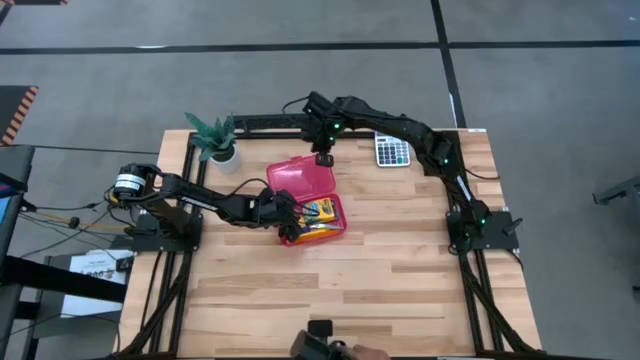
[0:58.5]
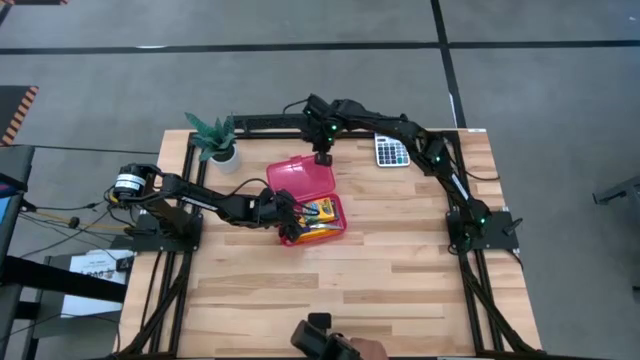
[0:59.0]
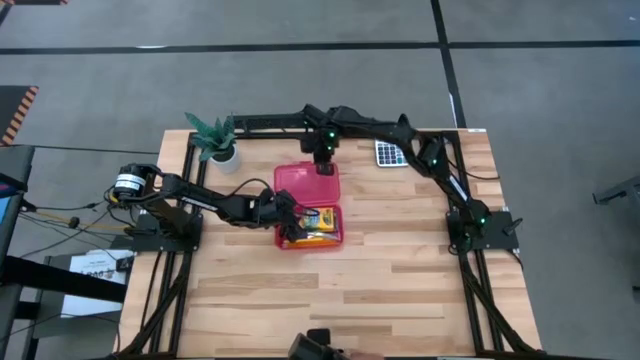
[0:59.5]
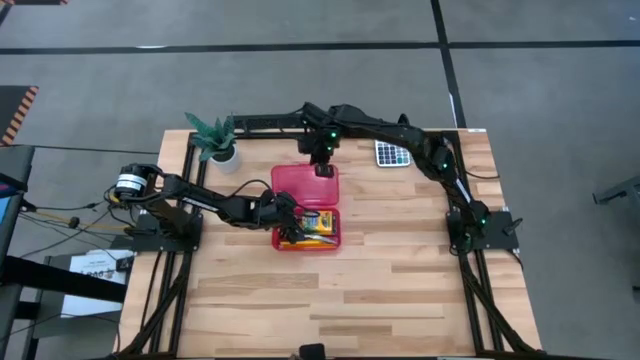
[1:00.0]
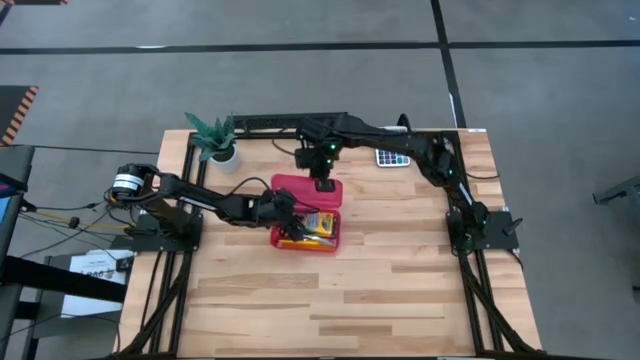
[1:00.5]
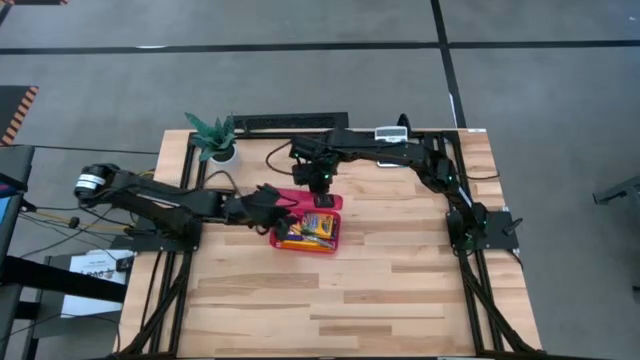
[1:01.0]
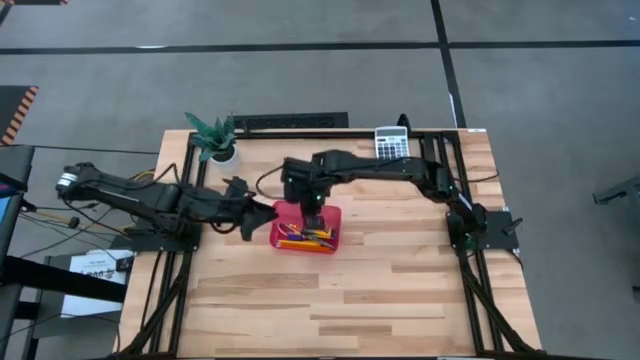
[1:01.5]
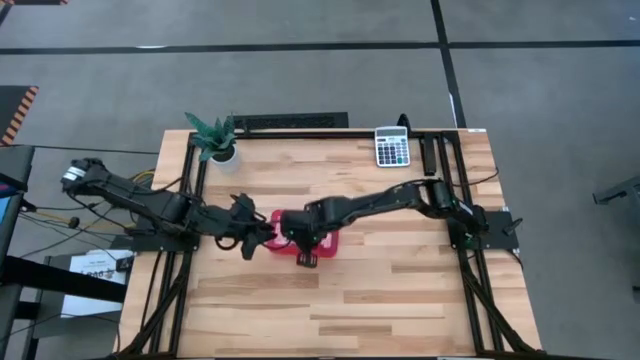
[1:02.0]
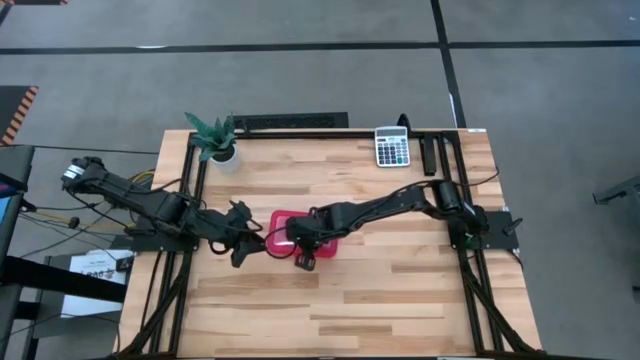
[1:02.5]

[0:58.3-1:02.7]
Task: Pack school essentials
Close the lid of the supply box

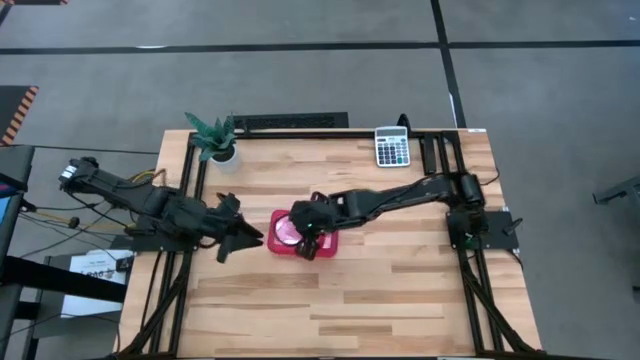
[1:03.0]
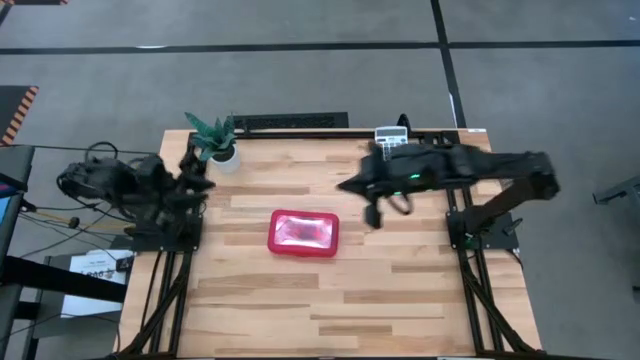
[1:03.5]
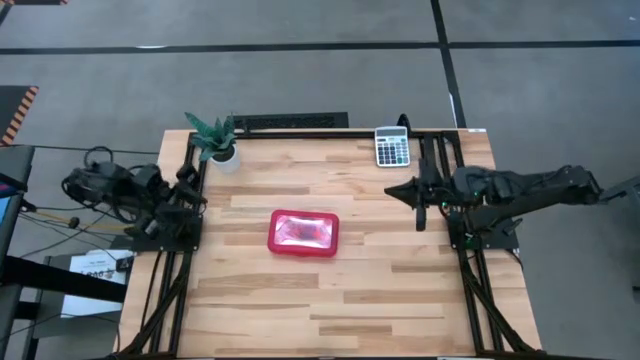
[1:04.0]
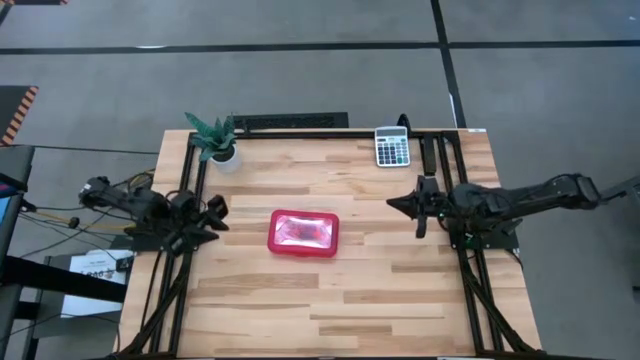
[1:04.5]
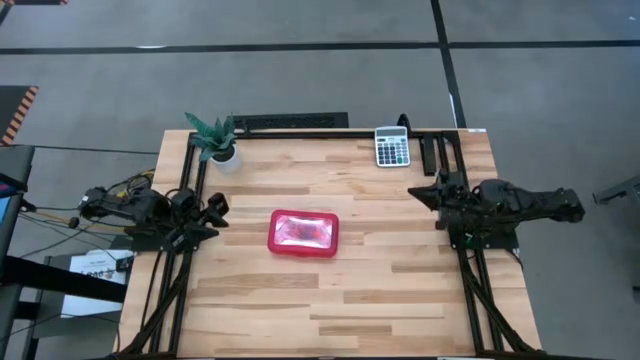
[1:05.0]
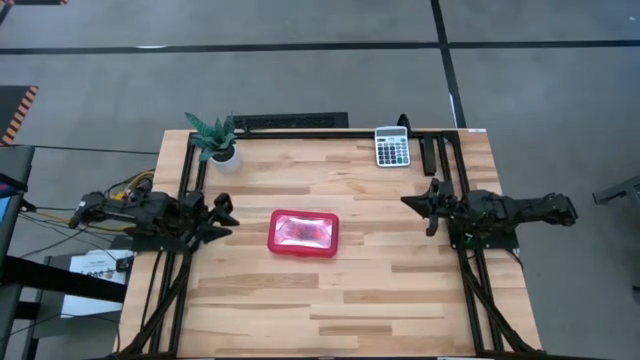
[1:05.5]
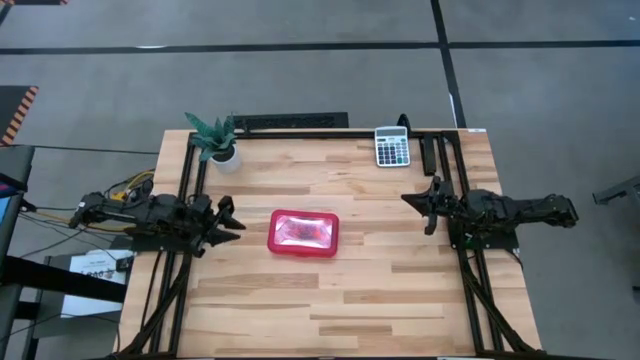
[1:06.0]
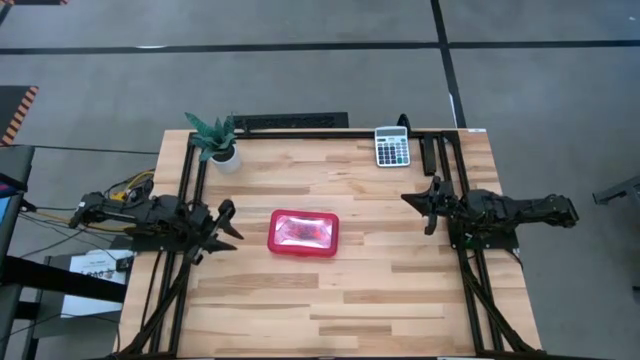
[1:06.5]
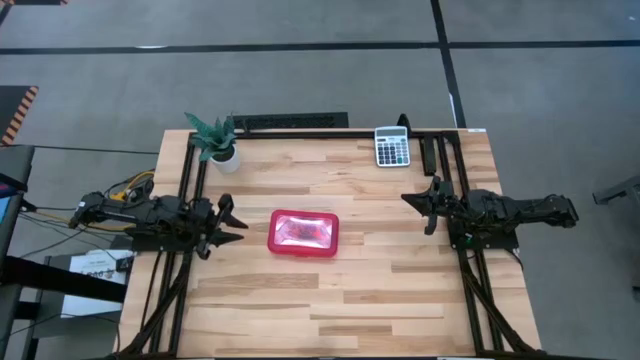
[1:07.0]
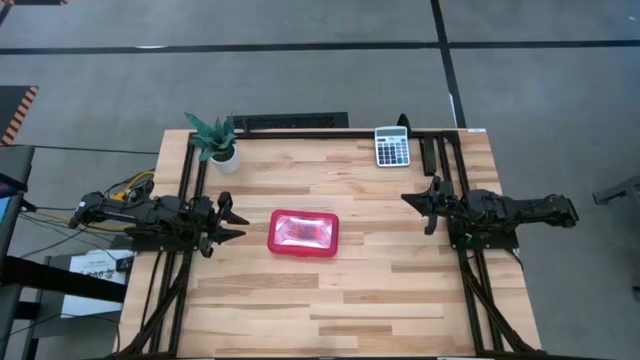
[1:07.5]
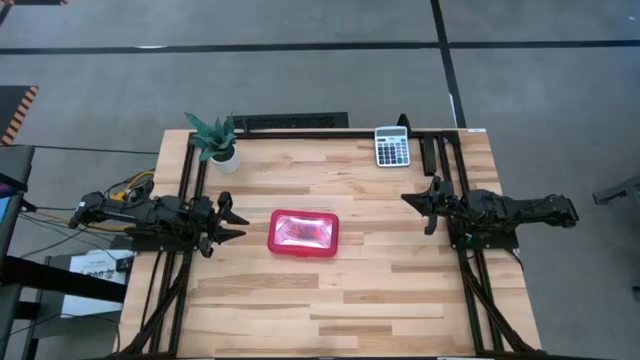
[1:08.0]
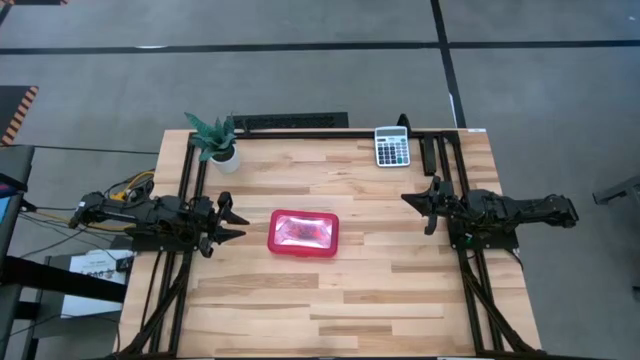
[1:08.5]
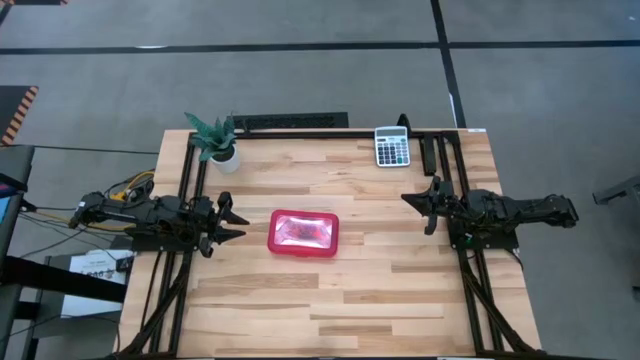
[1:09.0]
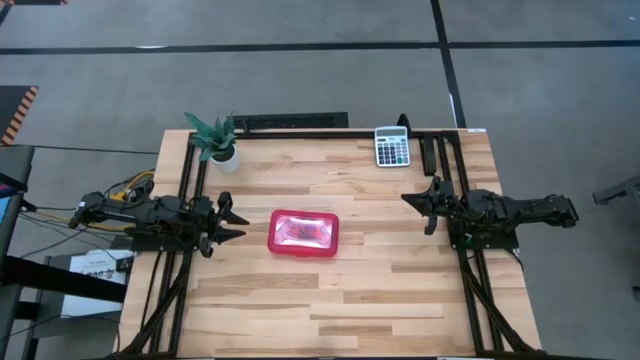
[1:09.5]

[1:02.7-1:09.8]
Return to Home Position

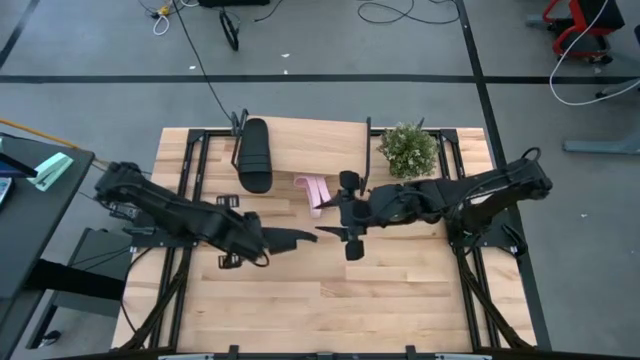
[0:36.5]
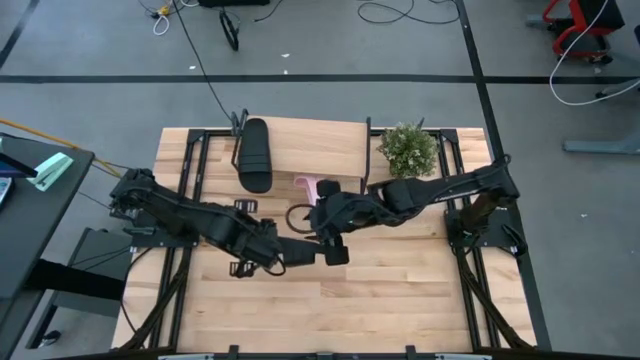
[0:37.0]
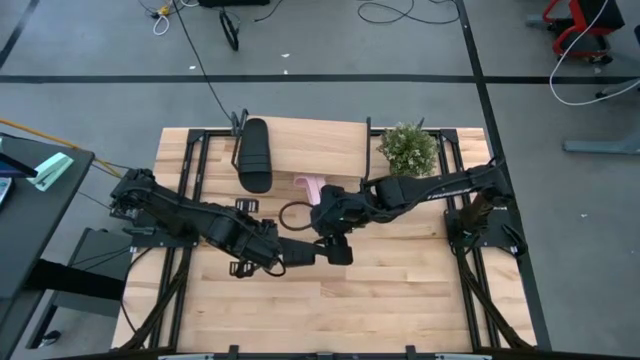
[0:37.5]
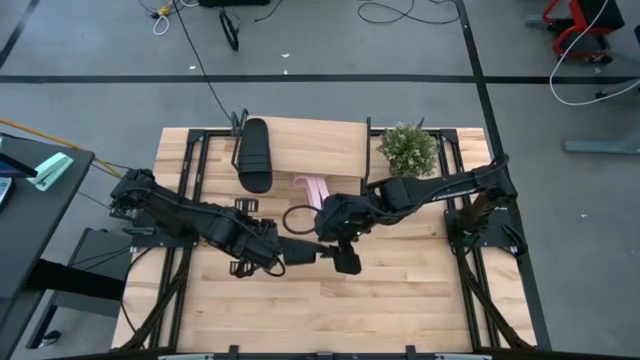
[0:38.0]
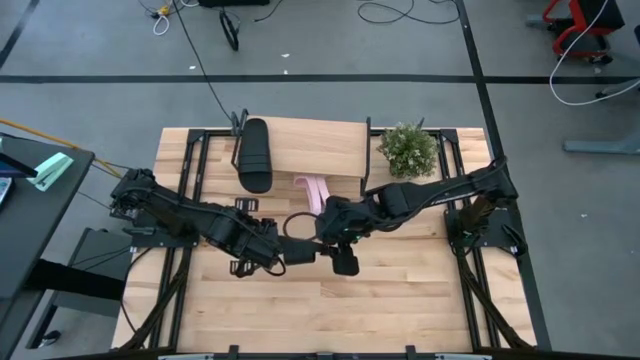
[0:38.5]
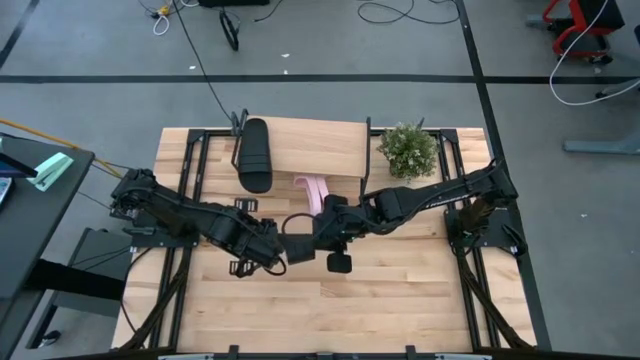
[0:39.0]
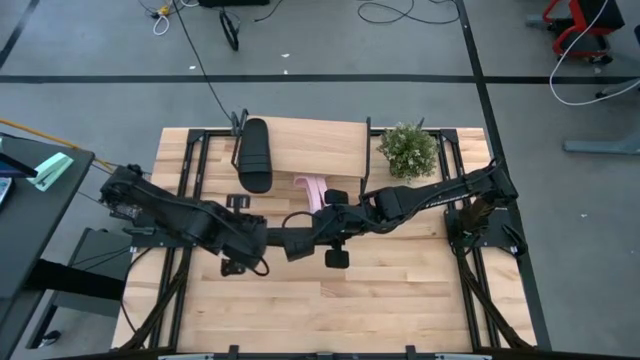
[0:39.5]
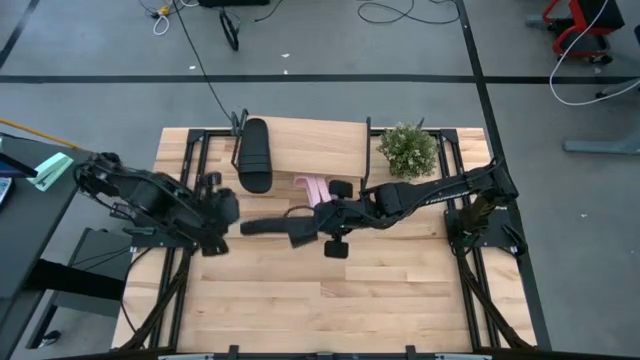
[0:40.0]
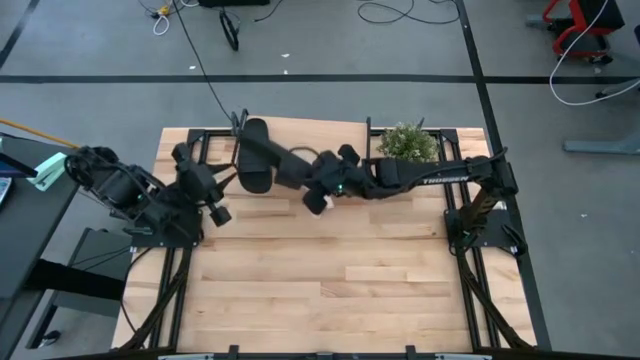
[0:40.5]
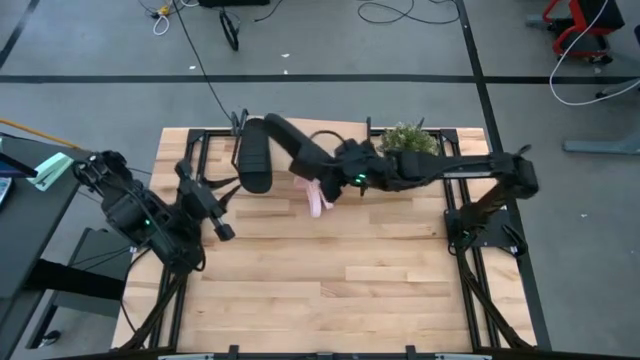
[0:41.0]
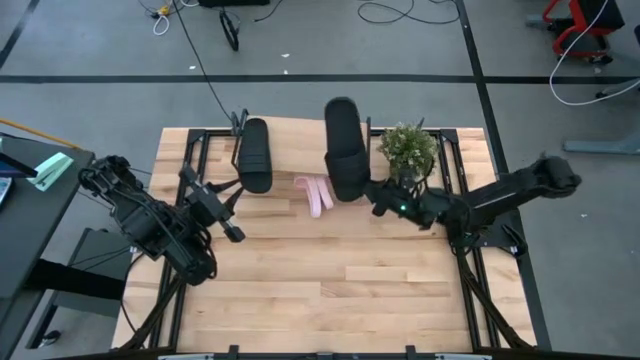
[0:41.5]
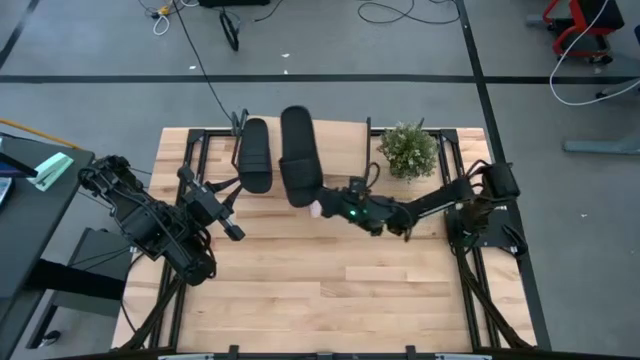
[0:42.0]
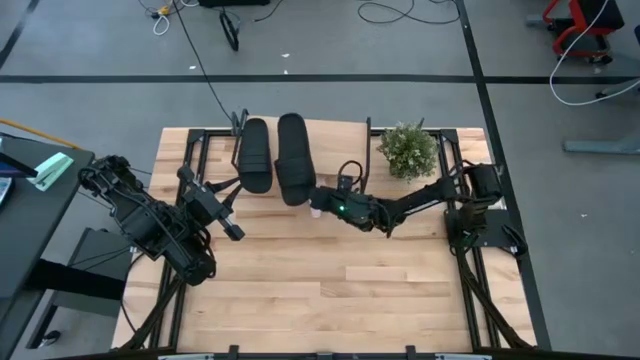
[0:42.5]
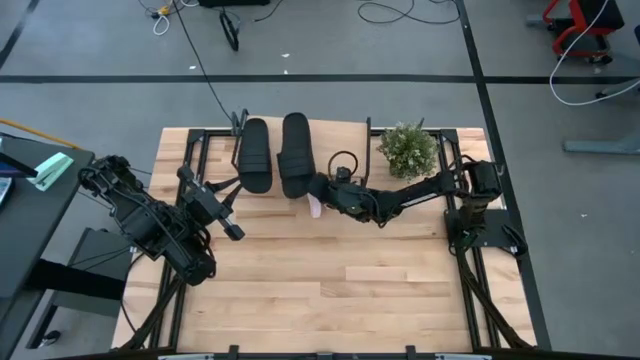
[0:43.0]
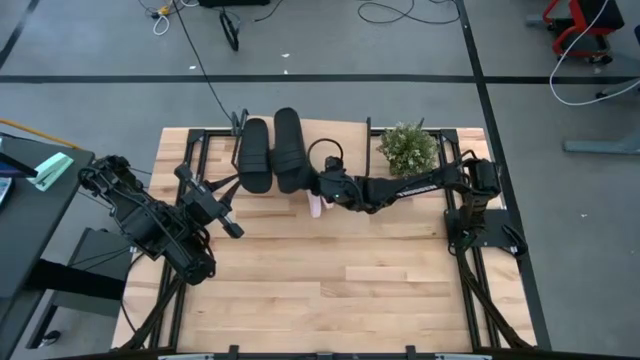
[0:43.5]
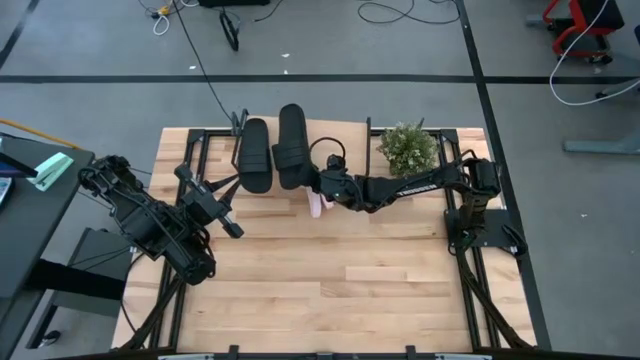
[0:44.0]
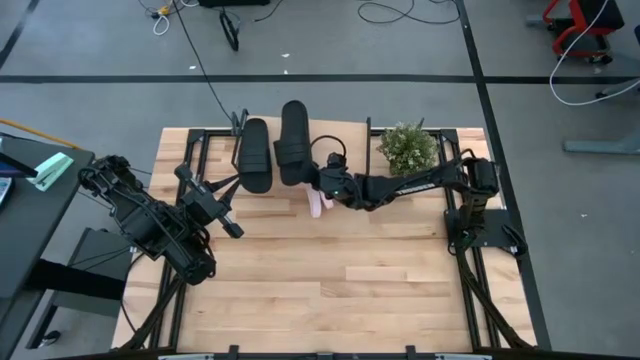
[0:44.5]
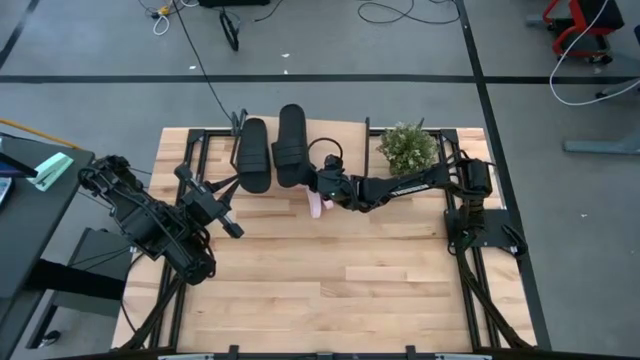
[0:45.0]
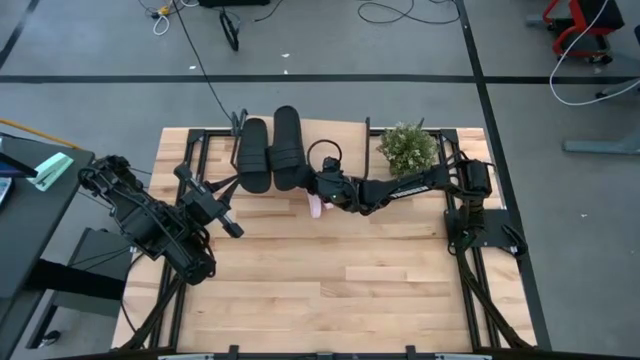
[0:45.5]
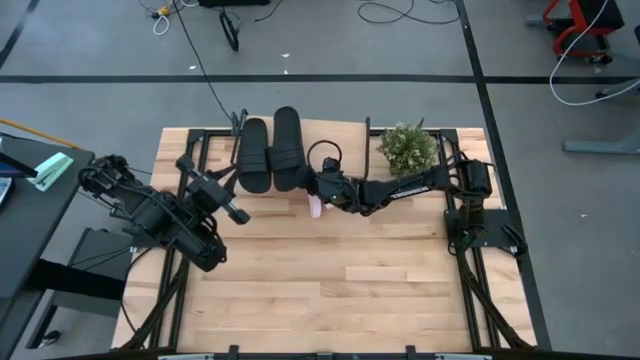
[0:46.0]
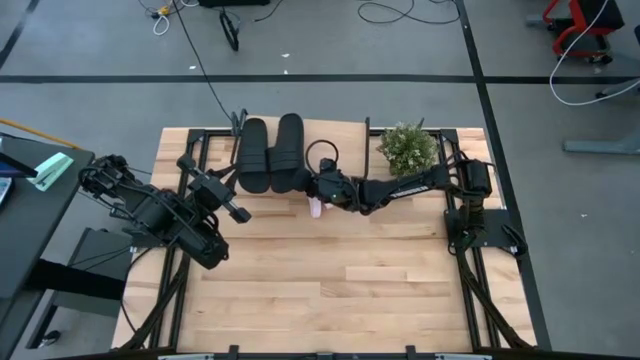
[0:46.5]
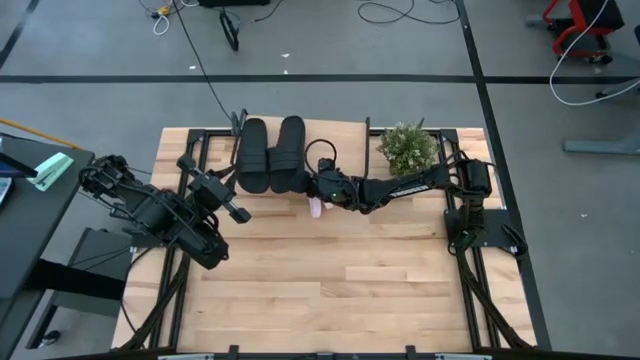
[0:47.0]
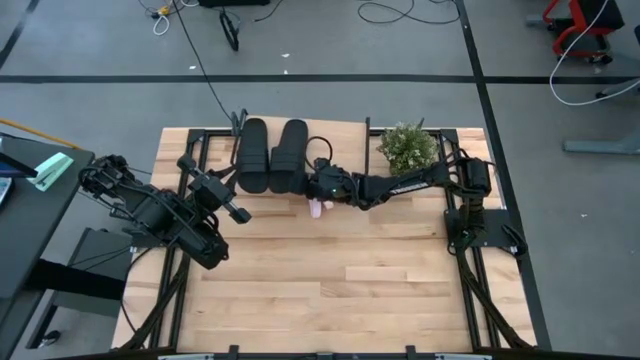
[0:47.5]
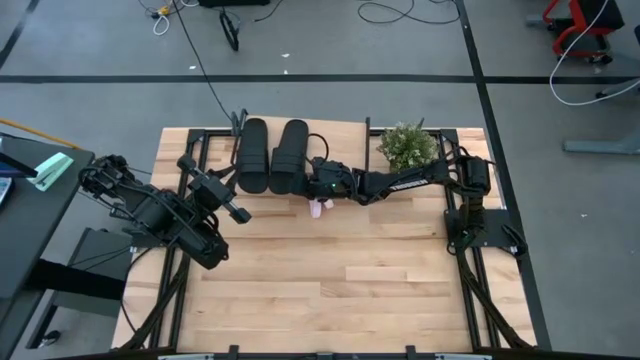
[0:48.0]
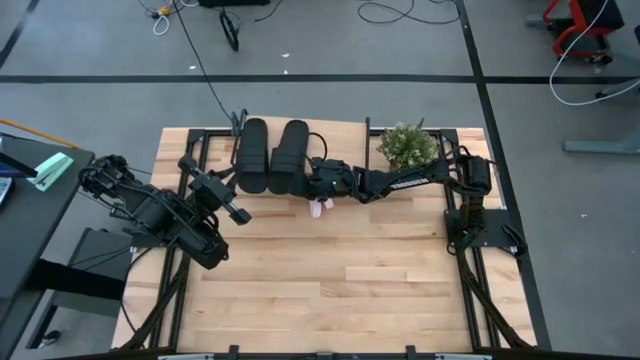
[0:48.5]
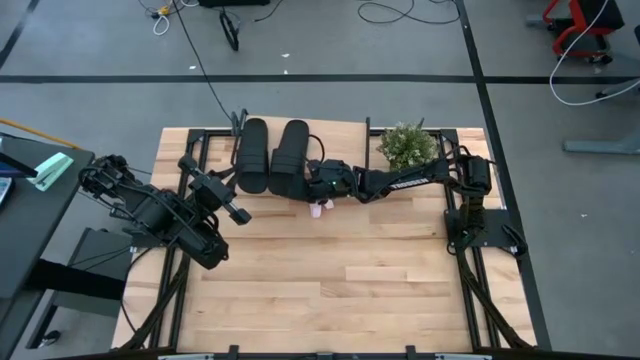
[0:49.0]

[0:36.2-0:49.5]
Task: Pick and place slides into the shelf
Put the black slide on the shelf
